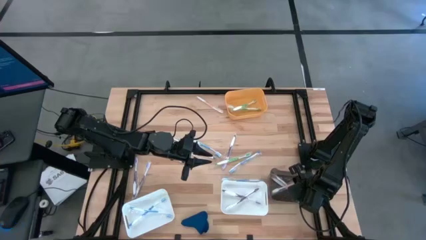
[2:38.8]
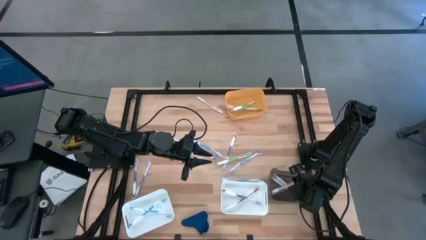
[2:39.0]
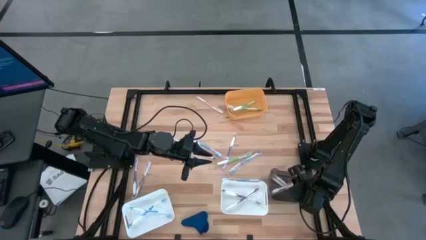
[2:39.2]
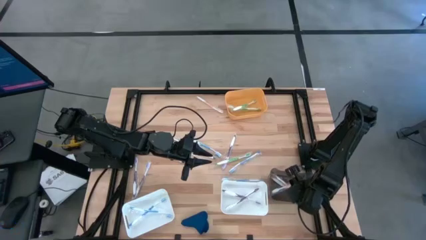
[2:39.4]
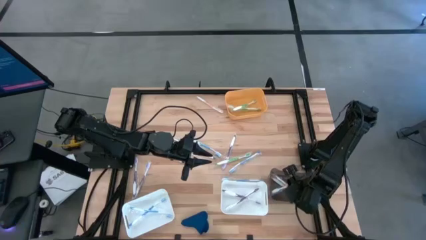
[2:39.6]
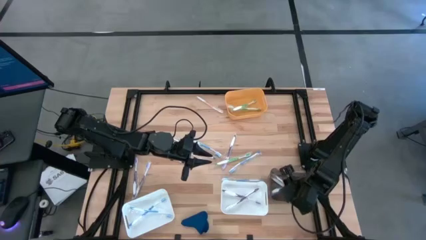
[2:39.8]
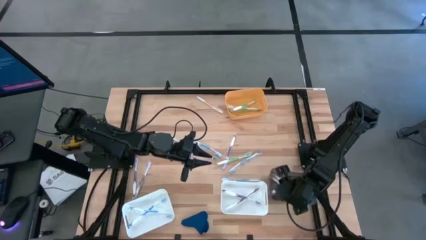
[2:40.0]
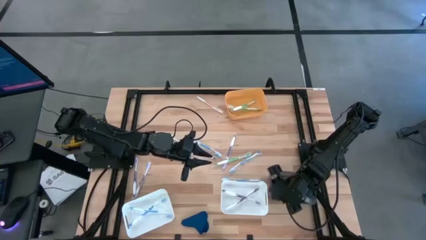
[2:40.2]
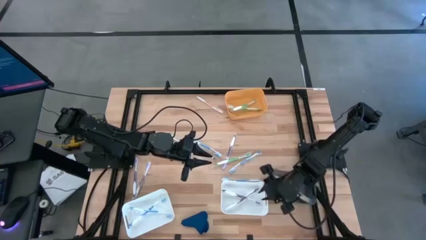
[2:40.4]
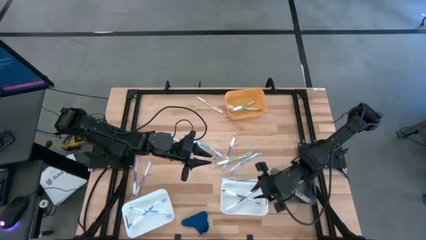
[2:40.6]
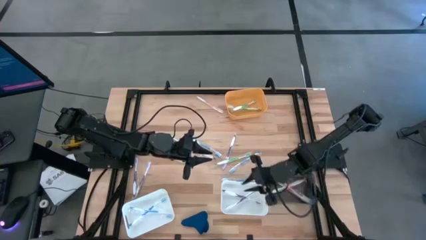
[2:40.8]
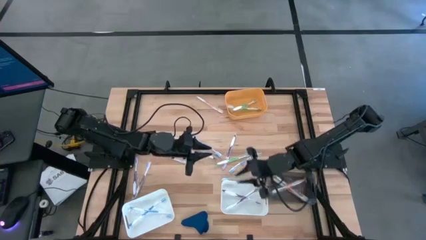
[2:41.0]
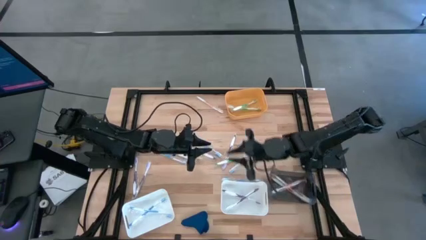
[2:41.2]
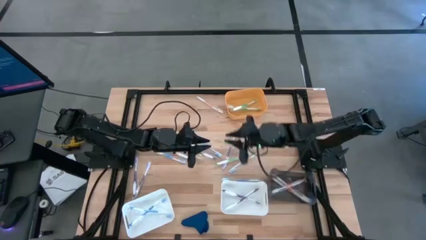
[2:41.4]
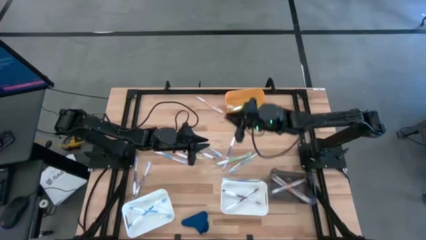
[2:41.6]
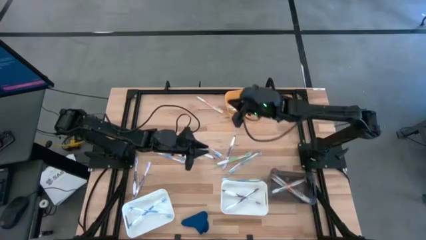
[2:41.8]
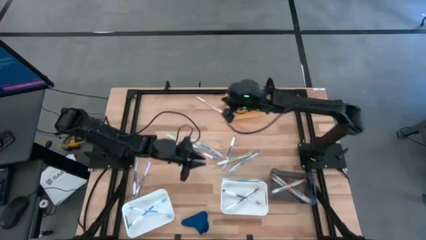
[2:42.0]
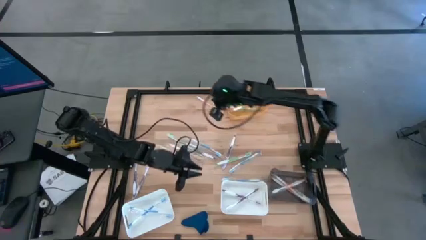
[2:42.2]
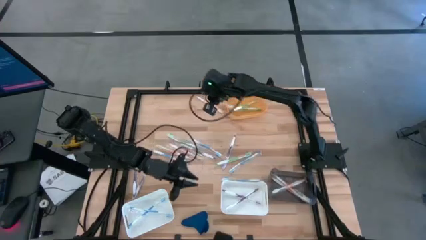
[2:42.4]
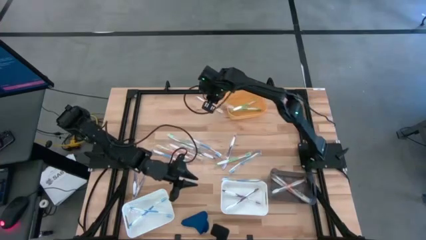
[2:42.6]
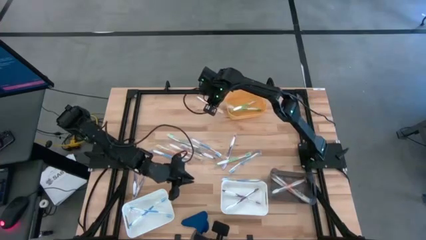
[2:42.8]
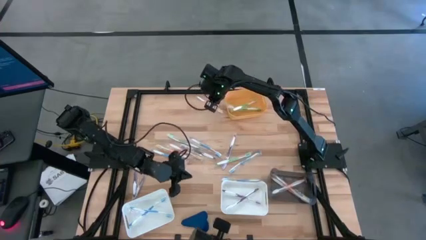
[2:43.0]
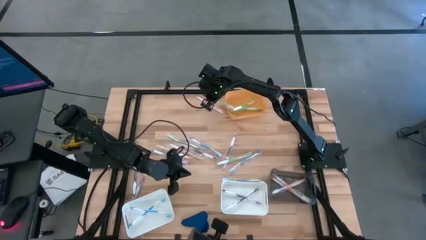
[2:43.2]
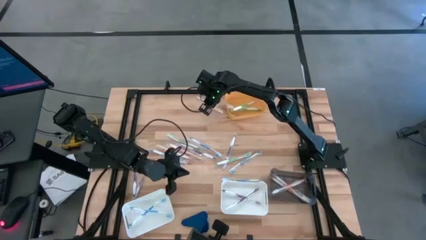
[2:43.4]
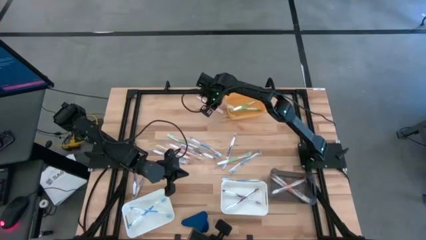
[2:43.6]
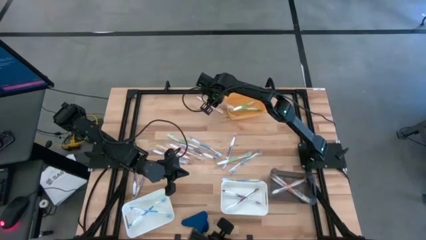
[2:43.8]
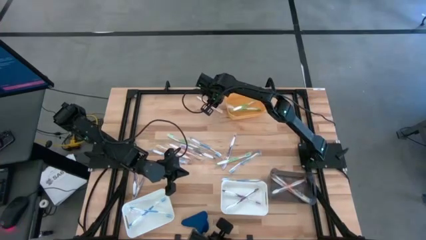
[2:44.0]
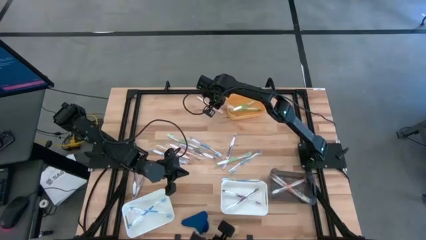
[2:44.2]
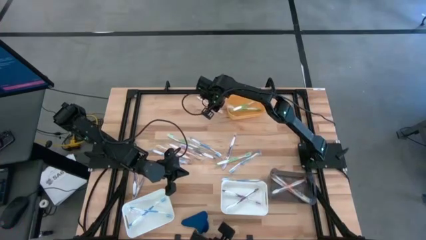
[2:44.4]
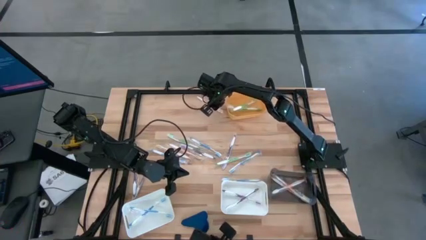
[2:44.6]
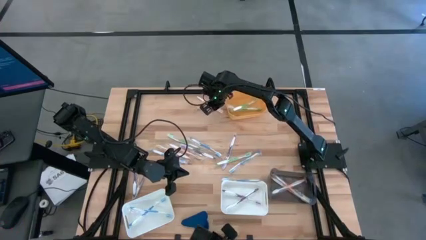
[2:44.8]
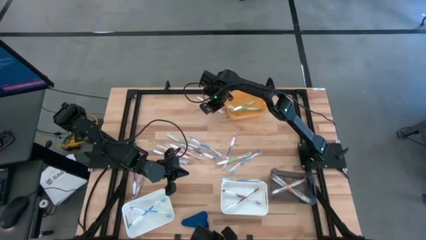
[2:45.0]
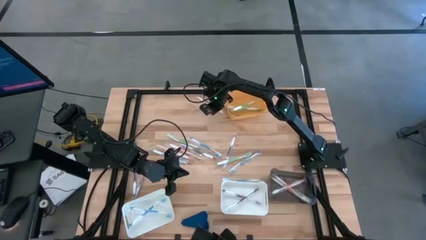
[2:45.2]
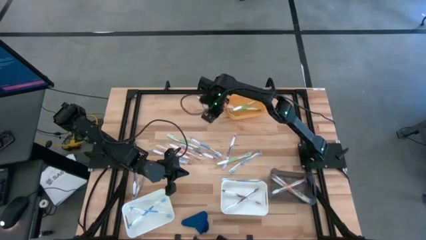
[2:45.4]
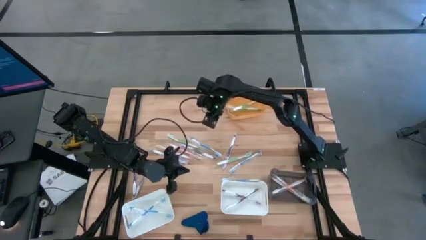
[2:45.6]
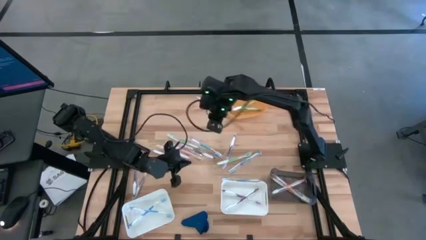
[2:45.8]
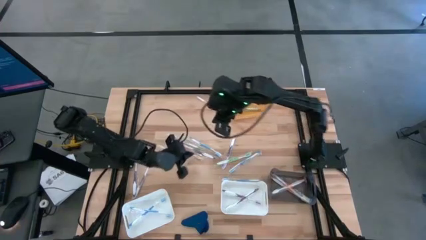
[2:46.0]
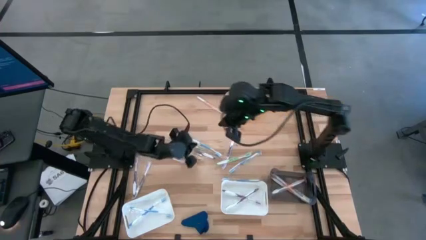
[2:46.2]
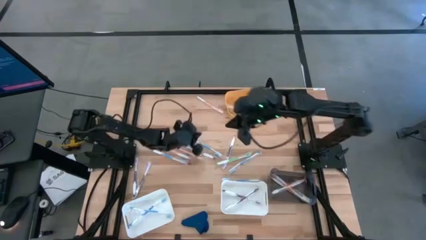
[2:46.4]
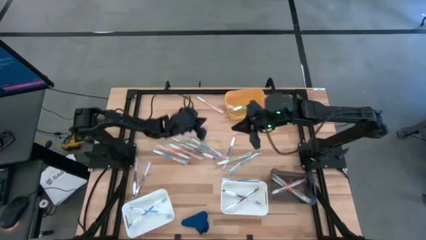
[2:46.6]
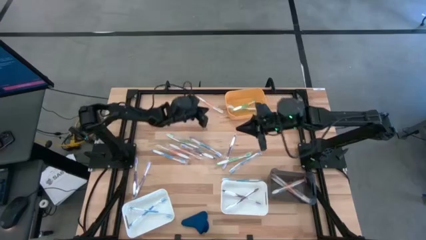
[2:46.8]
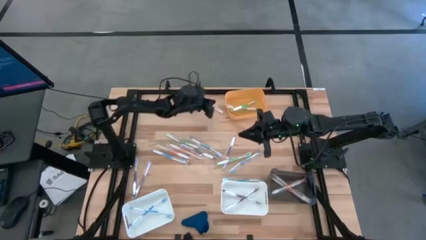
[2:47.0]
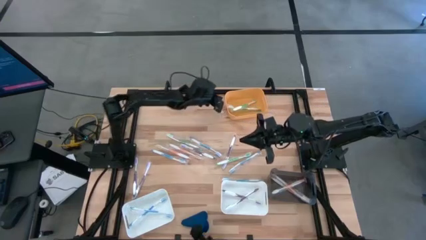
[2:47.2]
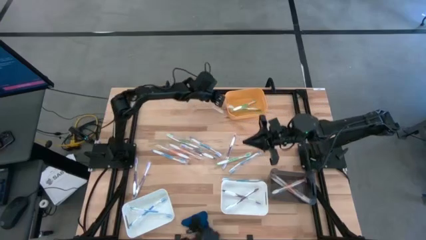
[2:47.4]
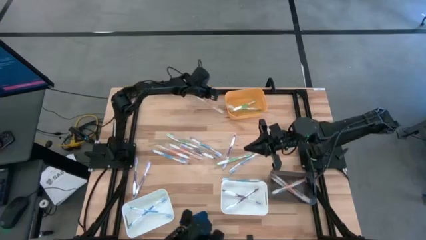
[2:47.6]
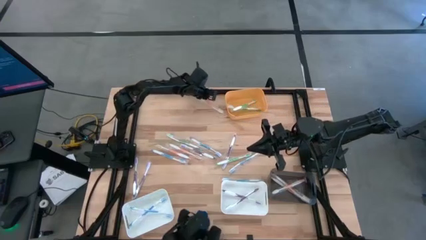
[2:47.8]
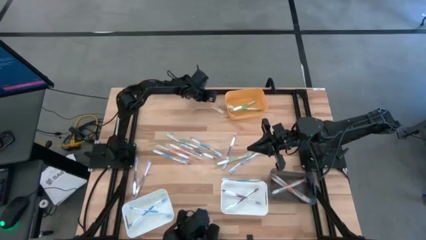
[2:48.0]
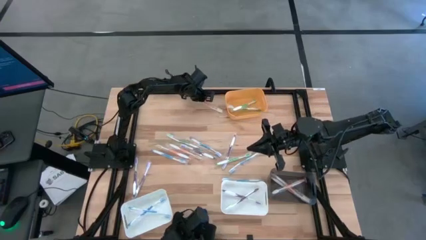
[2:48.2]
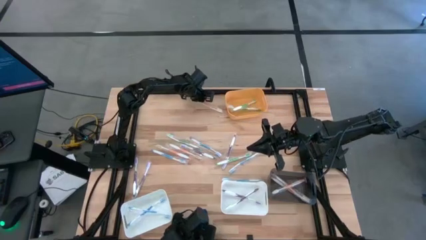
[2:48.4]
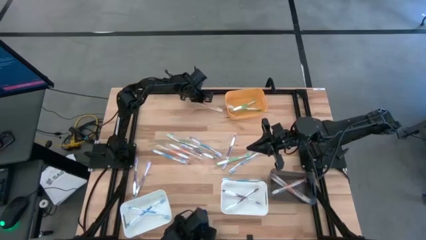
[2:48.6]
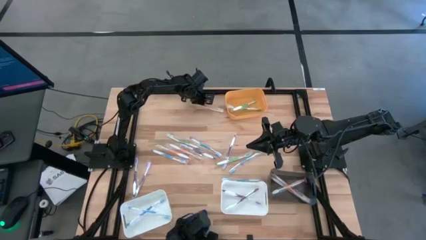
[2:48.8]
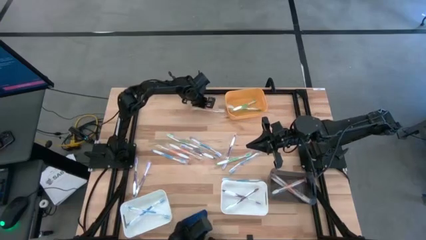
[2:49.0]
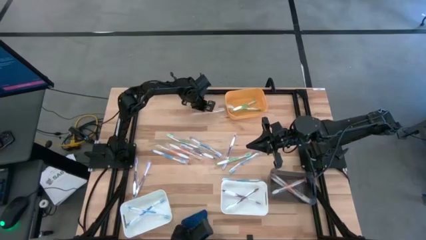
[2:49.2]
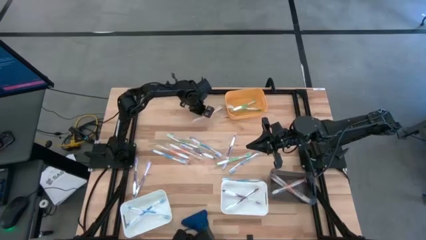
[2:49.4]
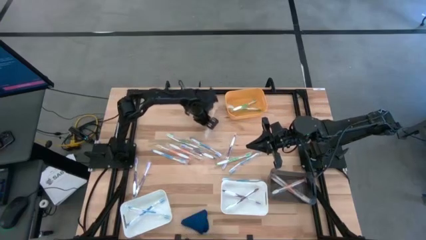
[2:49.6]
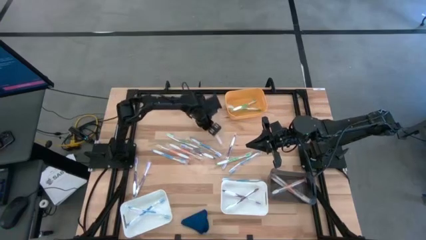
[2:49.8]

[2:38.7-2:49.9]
Task: Pick & Place Toothbrushes
Put the orange toothbrush into the black bin

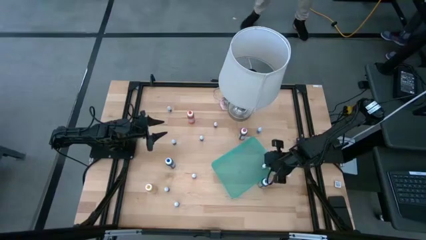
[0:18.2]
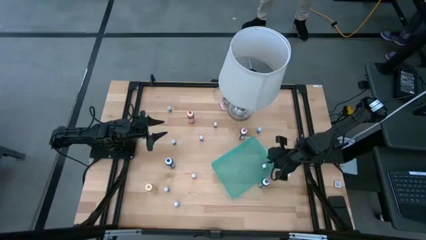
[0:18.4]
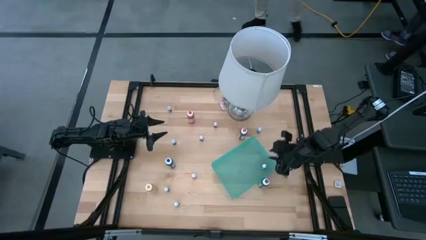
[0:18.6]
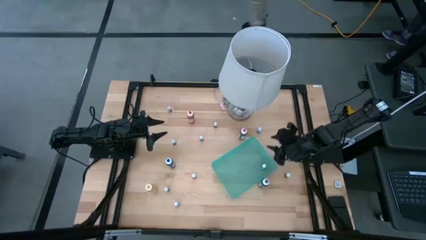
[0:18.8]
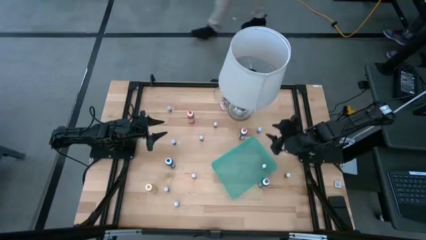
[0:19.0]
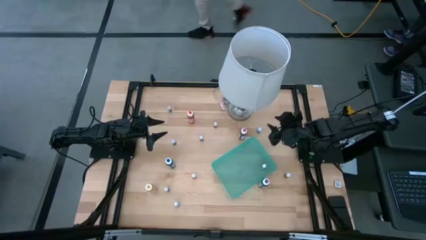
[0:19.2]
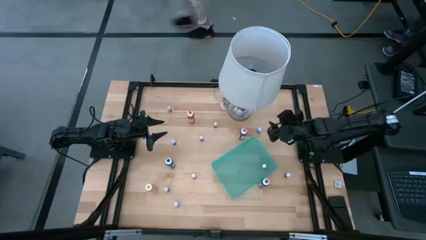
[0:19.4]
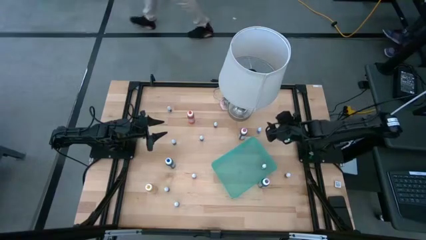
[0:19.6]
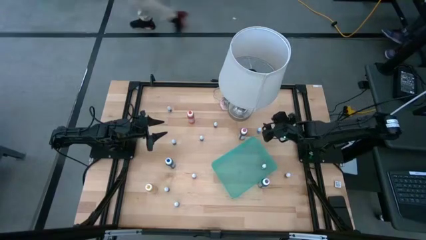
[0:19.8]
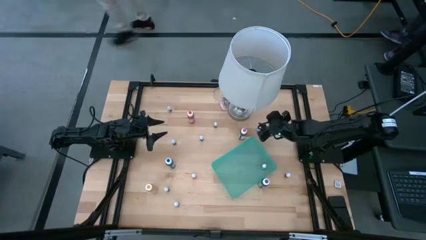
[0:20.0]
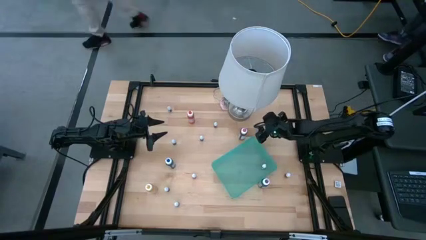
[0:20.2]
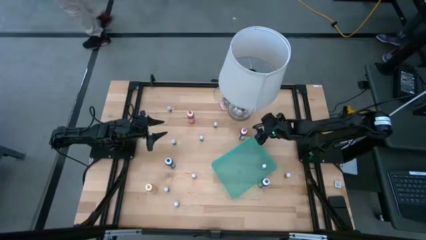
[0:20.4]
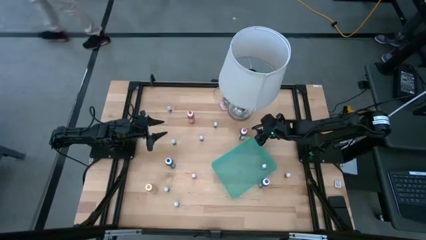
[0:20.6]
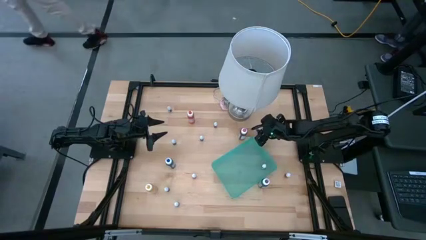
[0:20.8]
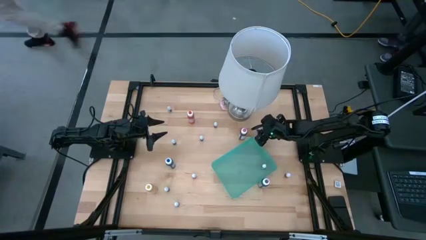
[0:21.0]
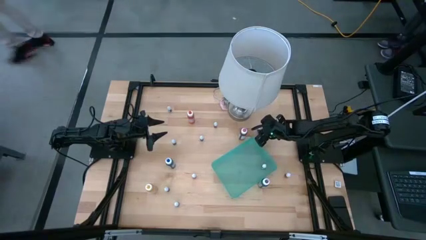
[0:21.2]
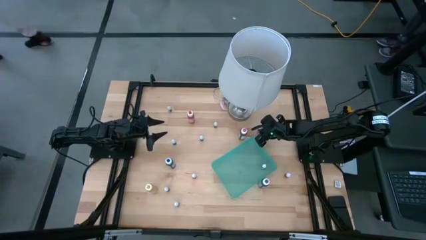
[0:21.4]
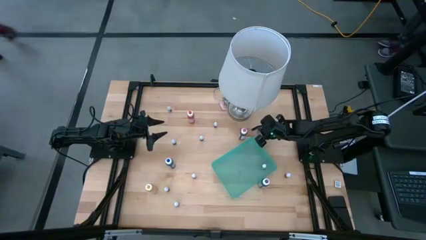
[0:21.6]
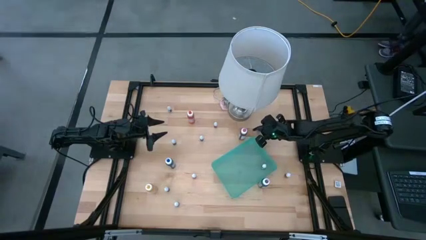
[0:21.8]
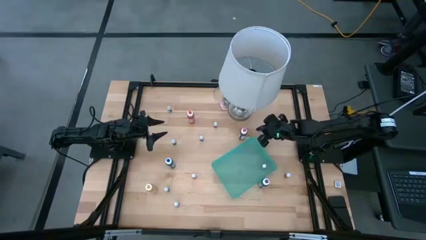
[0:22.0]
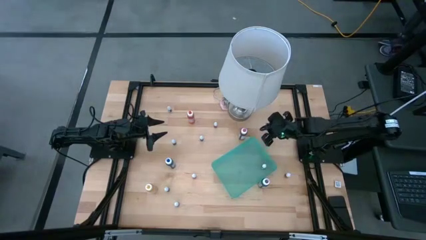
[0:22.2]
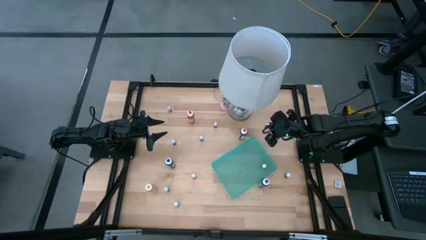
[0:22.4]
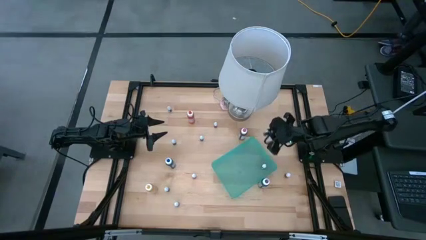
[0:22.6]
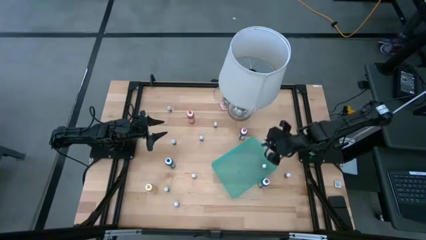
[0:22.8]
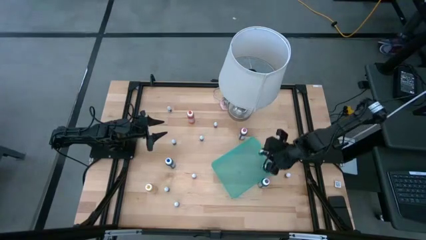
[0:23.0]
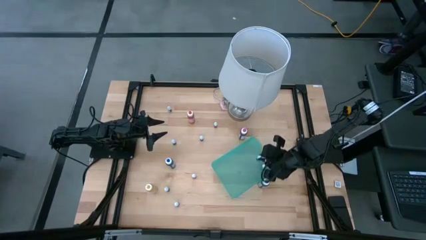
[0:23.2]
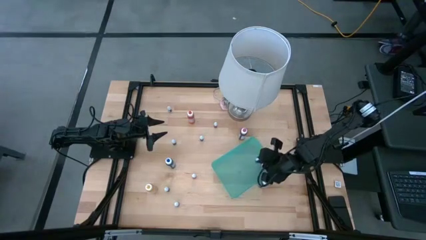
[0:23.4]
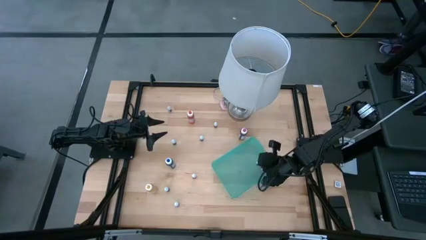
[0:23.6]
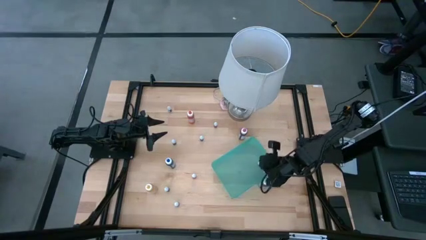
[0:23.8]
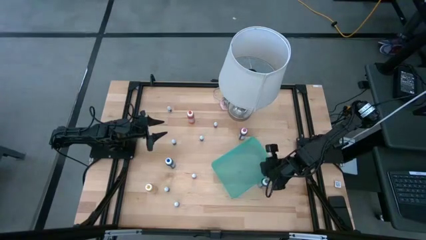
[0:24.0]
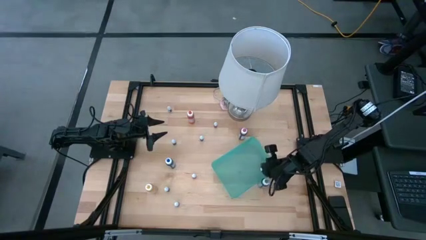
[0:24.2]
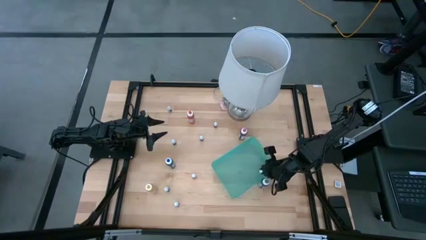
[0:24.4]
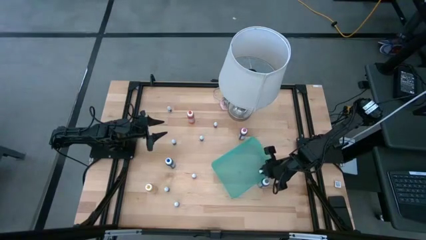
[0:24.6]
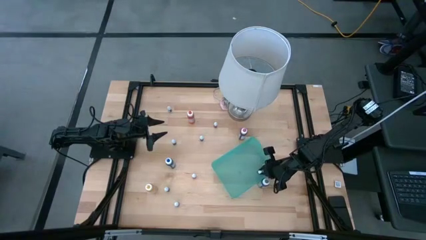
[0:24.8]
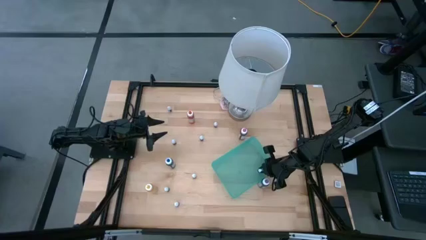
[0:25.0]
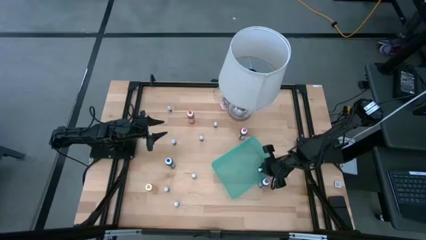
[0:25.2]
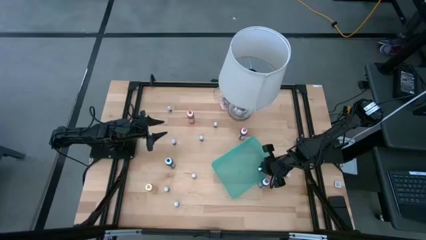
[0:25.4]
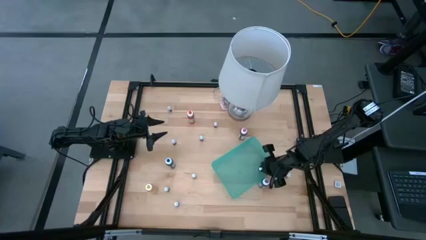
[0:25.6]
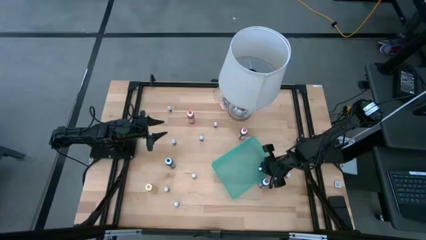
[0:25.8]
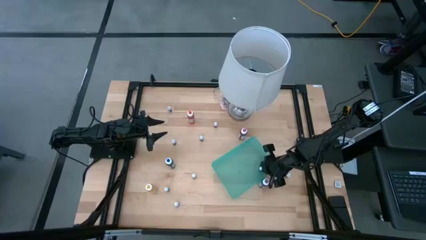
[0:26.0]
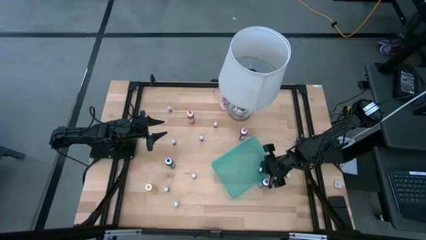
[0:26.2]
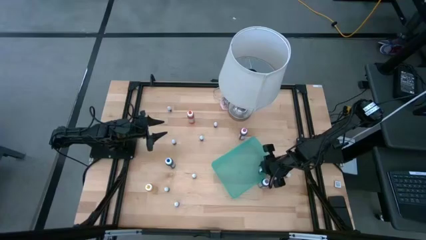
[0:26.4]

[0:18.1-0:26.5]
Task: Pick & Place food coloring
Put the small blue food coloring bottle into the green bin
